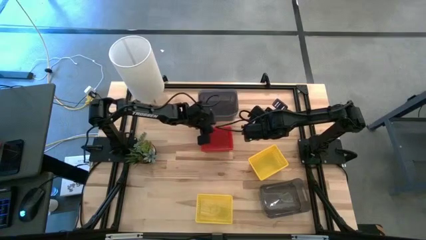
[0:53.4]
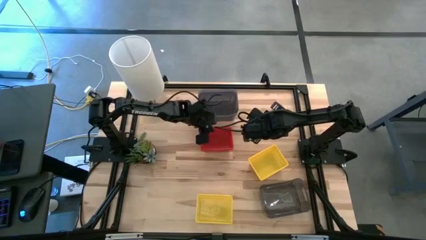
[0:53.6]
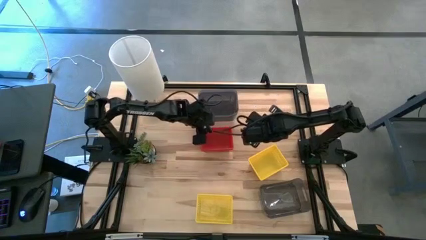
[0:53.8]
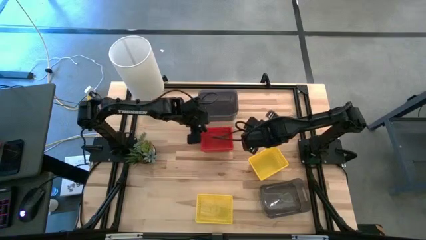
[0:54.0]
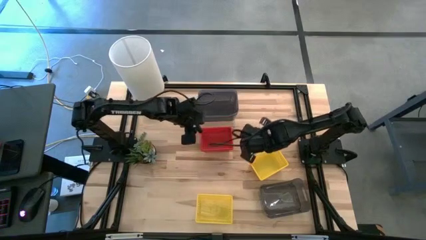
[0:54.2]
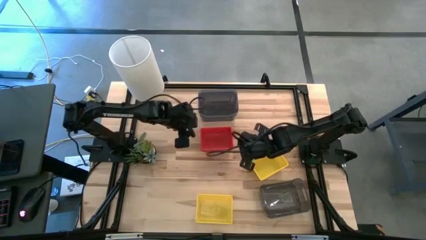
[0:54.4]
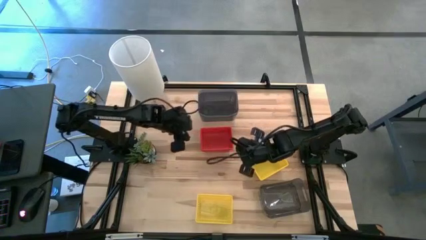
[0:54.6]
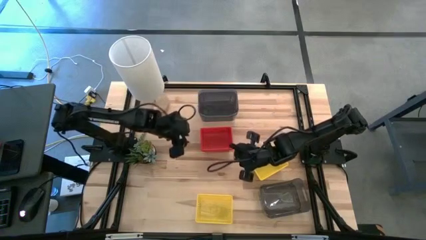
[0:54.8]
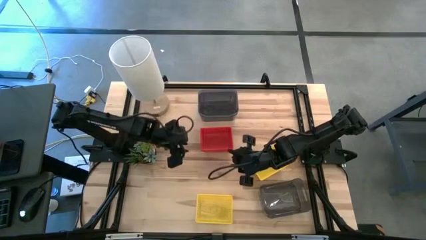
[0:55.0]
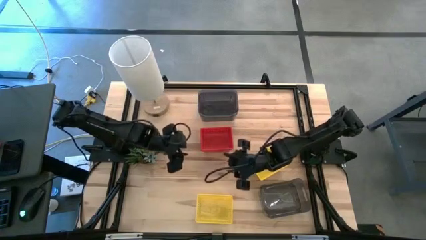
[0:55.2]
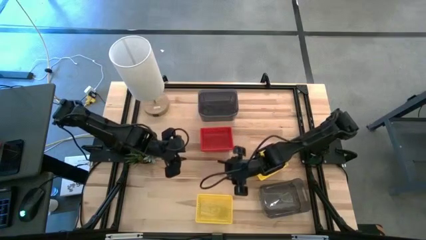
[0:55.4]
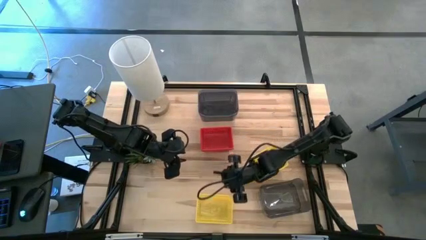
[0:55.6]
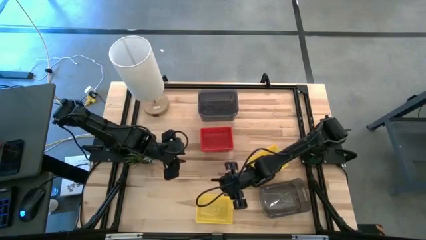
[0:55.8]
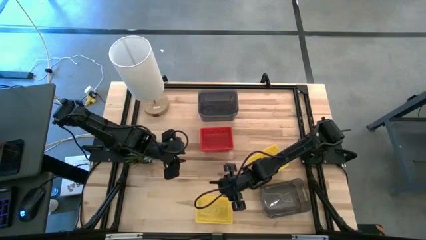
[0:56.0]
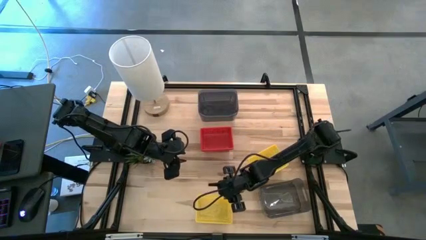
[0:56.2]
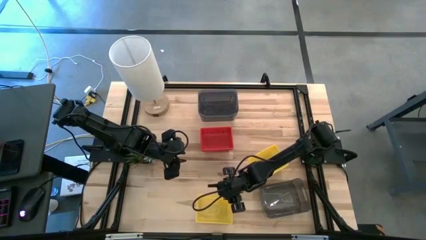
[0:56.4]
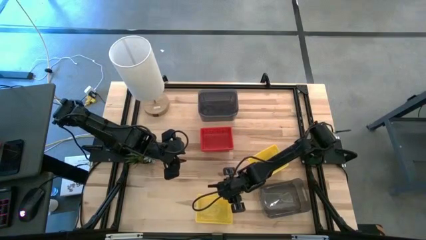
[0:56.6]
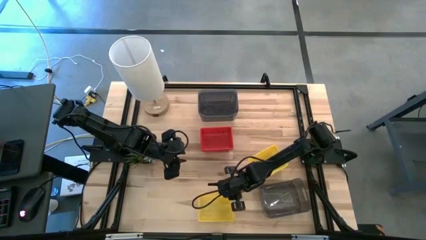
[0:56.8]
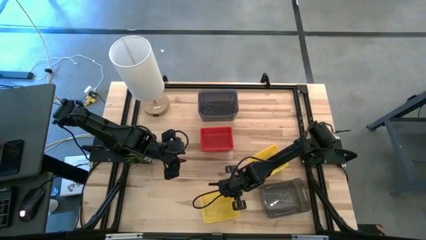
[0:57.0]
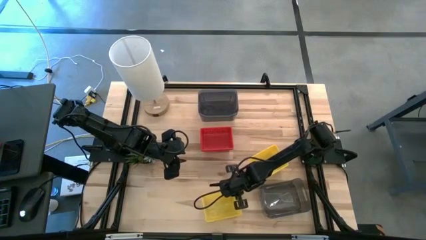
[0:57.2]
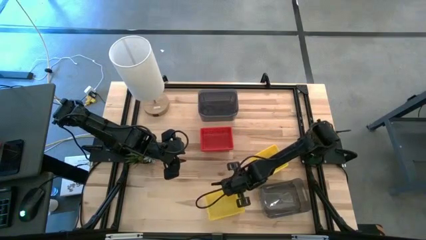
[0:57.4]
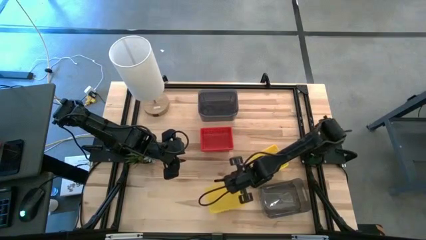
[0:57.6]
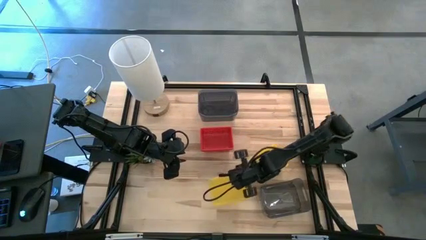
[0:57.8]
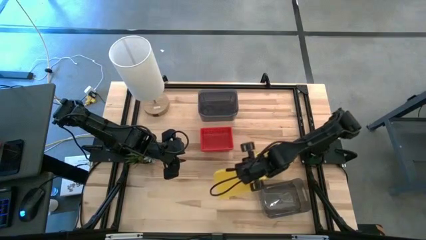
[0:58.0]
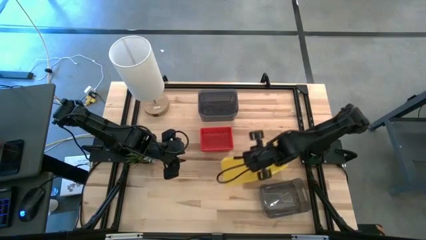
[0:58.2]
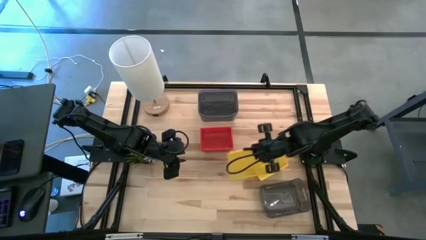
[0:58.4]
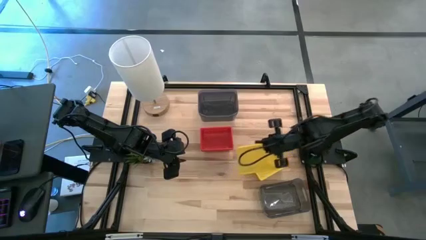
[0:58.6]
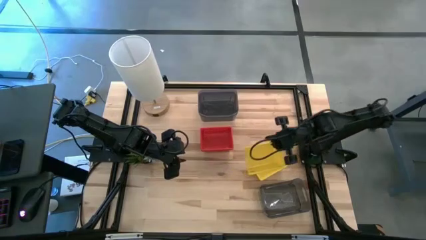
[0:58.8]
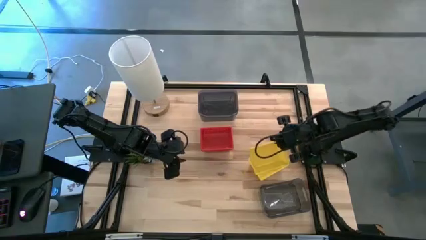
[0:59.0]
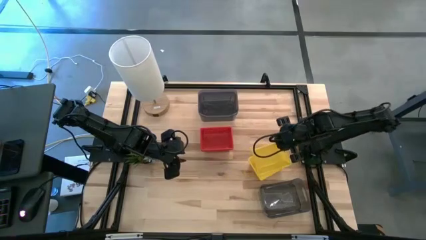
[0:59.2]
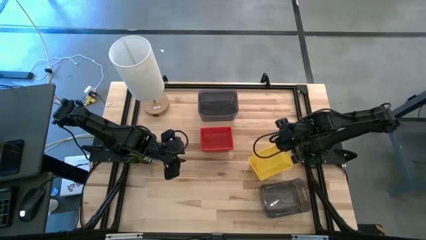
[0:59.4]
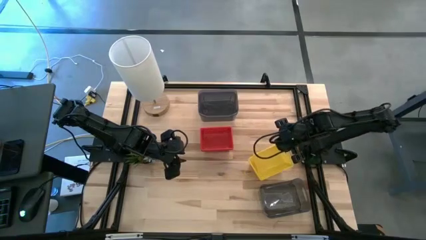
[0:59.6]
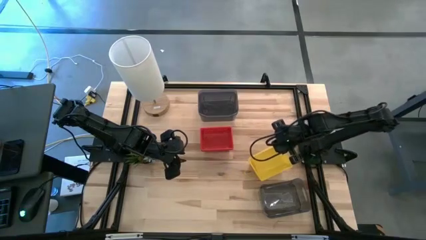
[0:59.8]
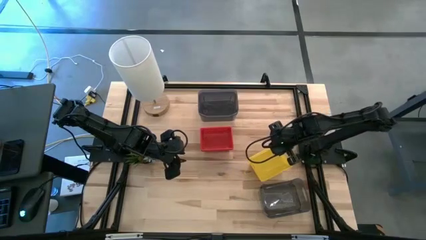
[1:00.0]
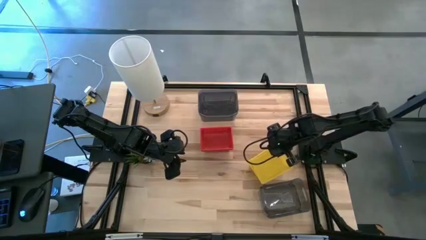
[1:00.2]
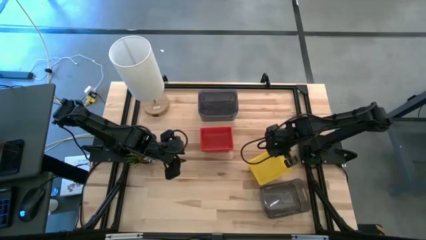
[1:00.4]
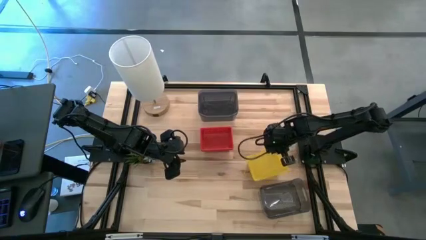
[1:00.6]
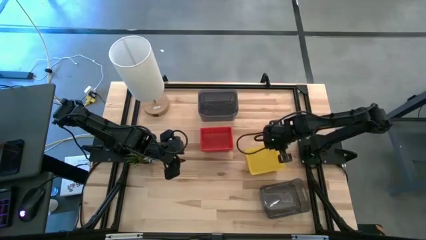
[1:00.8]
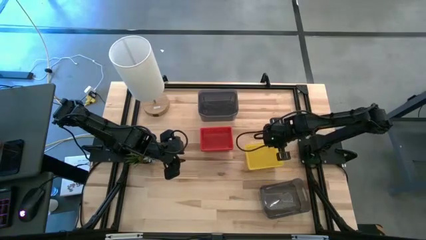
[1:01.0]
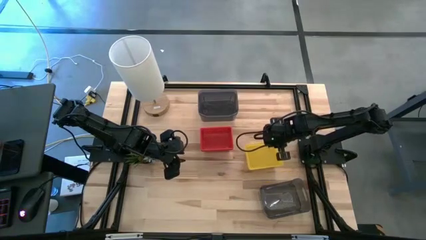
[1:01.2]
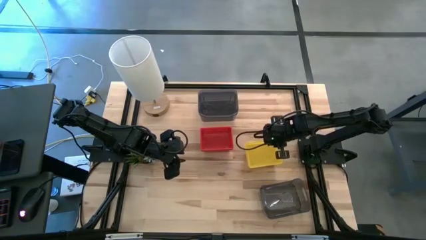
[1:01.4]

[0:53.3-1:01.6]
Stack the bottom yellow basket on the yellow baskets
